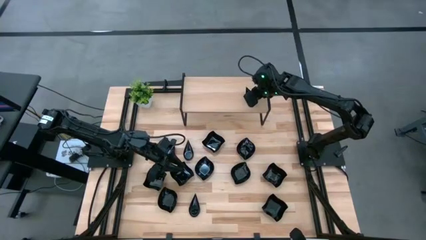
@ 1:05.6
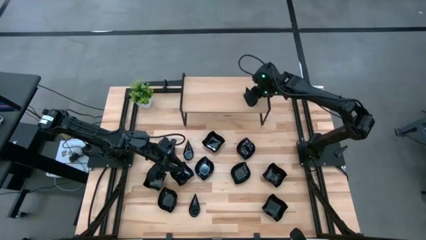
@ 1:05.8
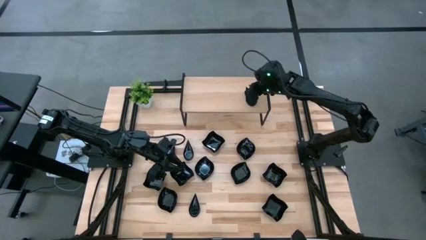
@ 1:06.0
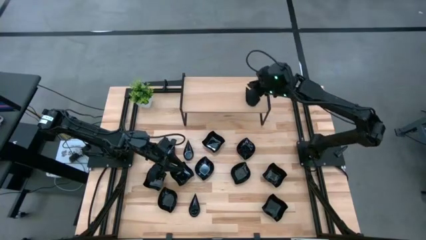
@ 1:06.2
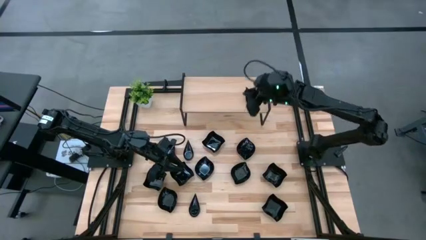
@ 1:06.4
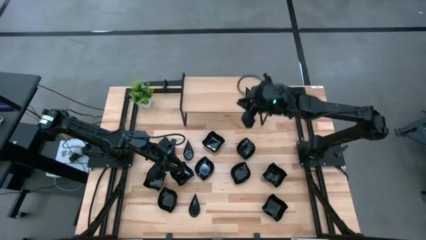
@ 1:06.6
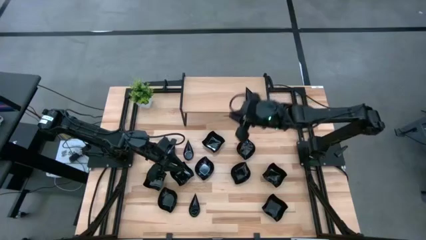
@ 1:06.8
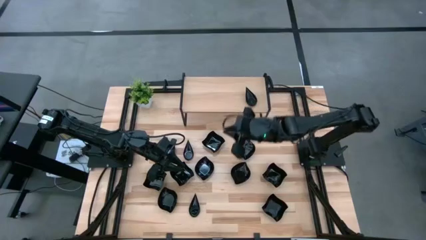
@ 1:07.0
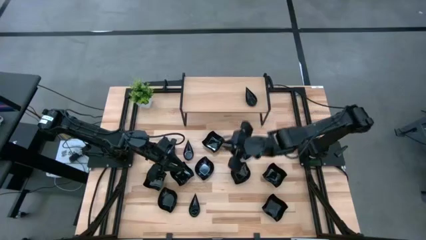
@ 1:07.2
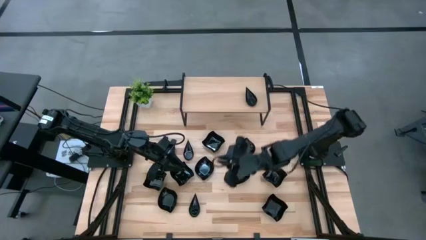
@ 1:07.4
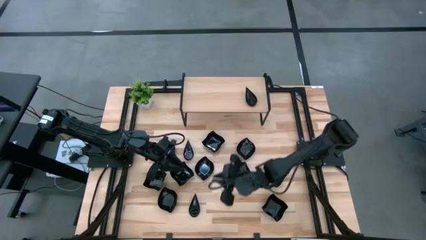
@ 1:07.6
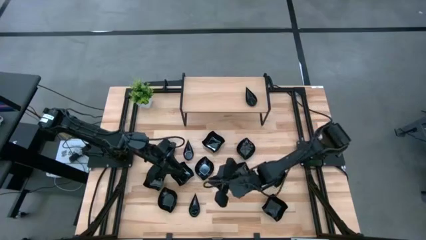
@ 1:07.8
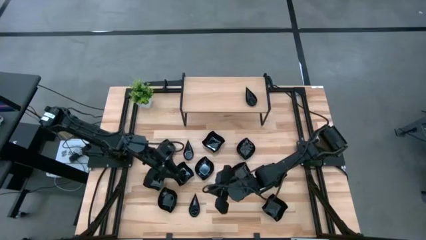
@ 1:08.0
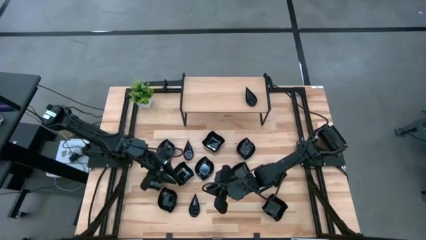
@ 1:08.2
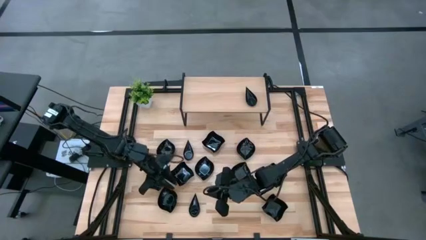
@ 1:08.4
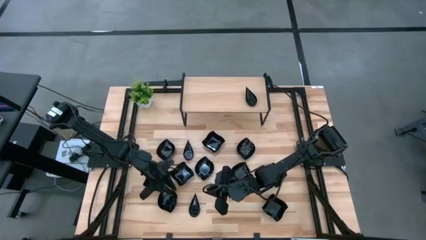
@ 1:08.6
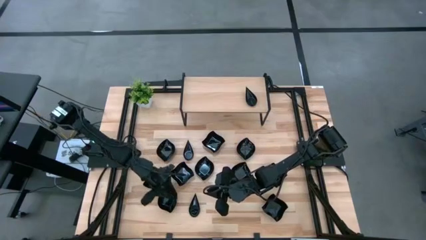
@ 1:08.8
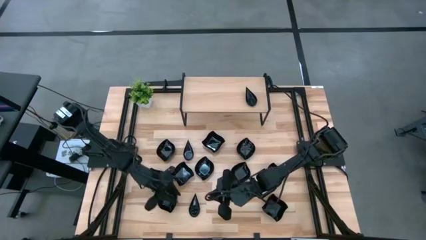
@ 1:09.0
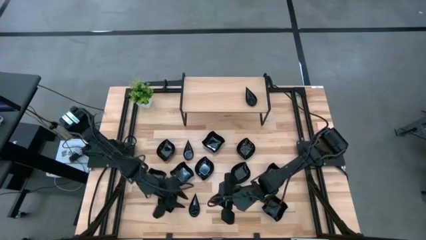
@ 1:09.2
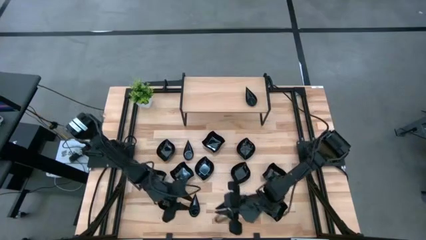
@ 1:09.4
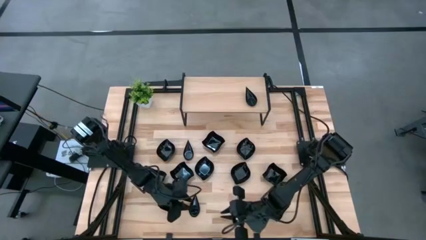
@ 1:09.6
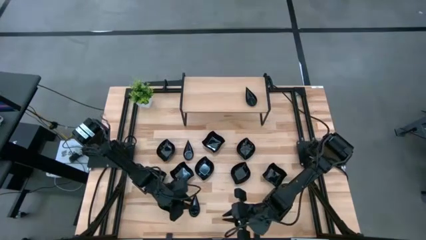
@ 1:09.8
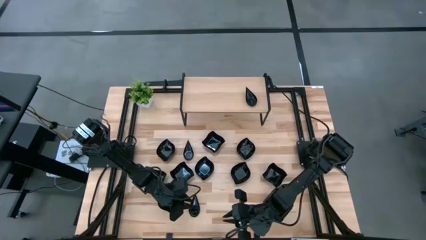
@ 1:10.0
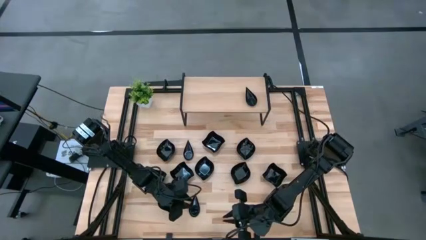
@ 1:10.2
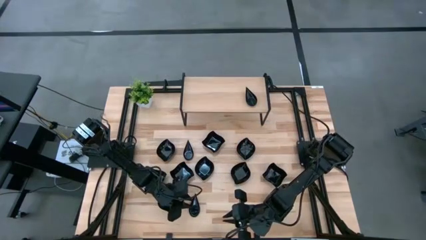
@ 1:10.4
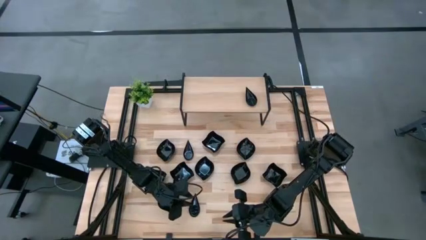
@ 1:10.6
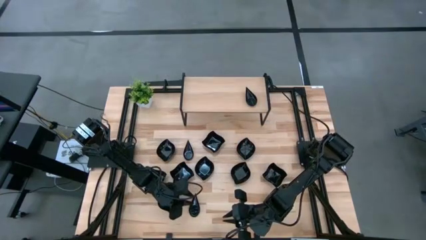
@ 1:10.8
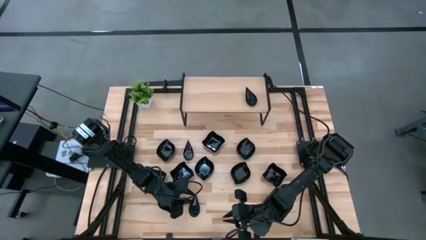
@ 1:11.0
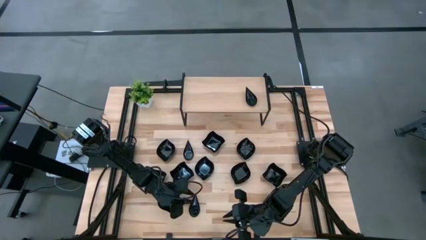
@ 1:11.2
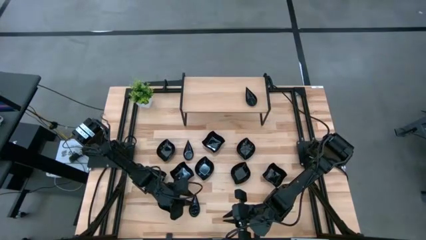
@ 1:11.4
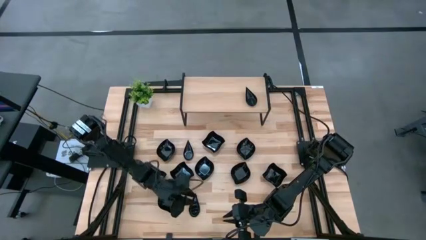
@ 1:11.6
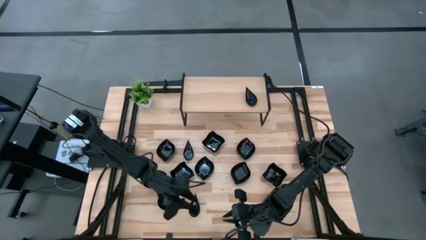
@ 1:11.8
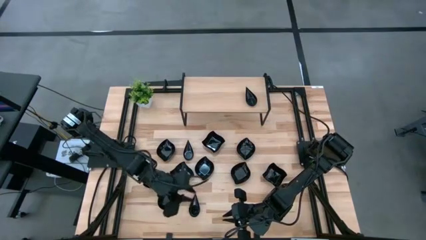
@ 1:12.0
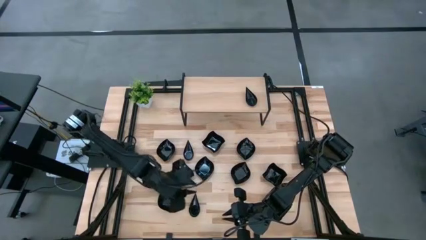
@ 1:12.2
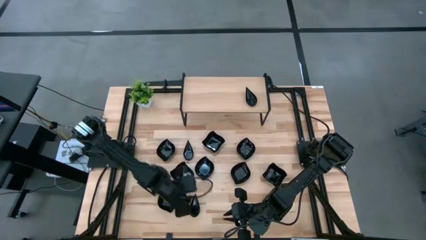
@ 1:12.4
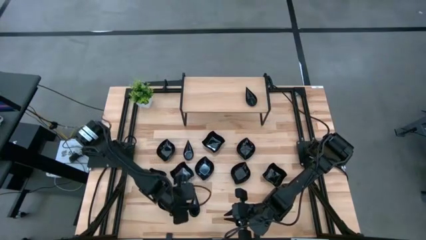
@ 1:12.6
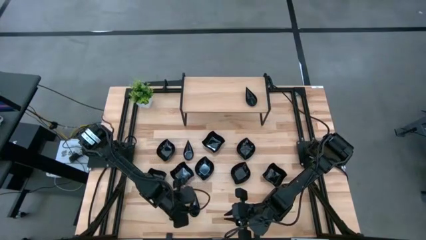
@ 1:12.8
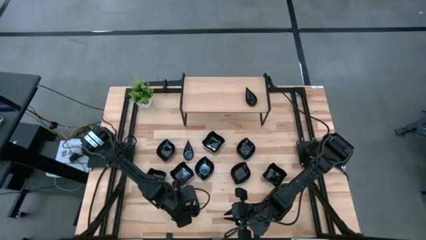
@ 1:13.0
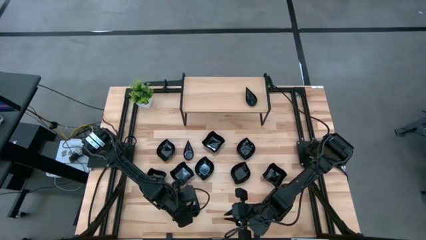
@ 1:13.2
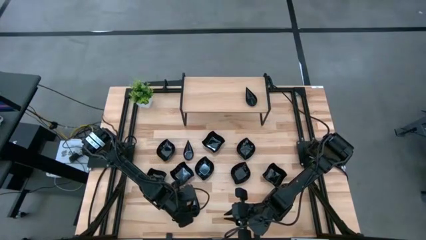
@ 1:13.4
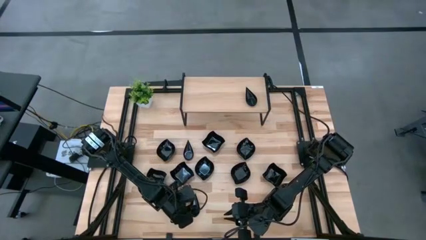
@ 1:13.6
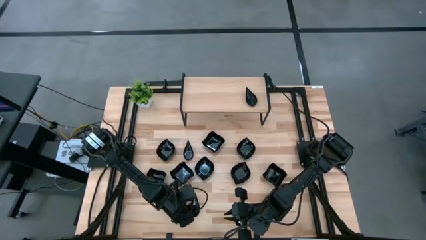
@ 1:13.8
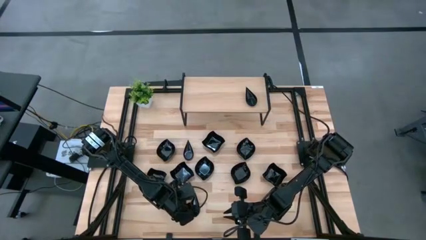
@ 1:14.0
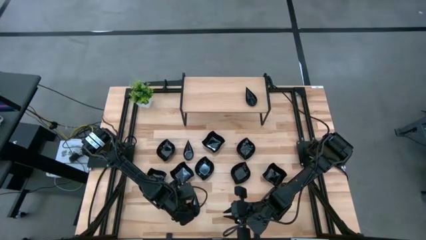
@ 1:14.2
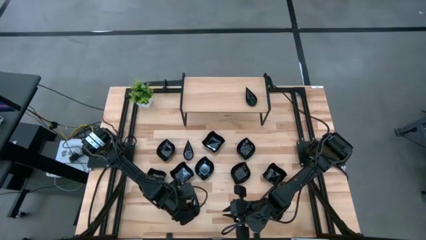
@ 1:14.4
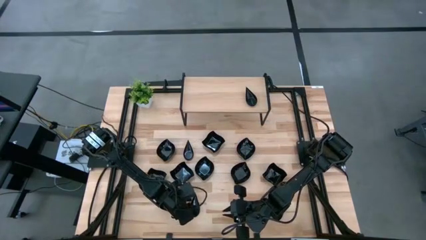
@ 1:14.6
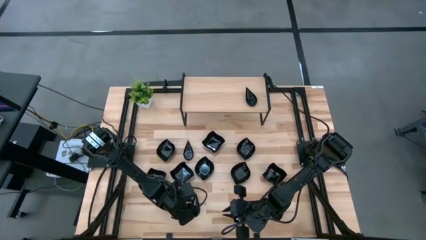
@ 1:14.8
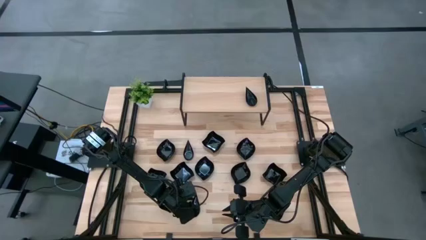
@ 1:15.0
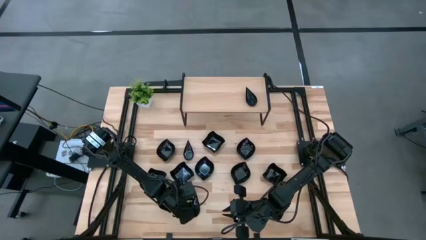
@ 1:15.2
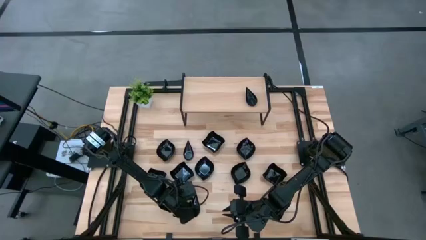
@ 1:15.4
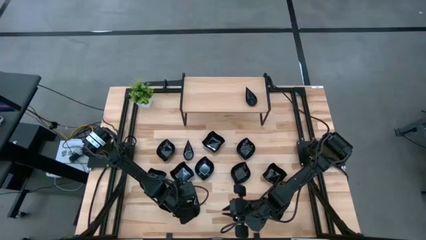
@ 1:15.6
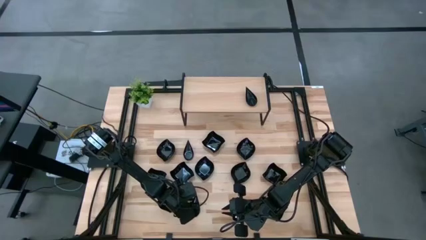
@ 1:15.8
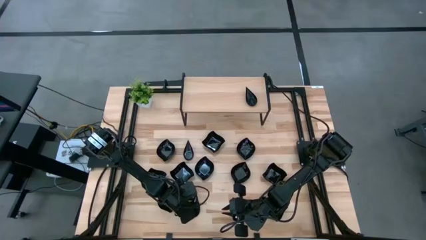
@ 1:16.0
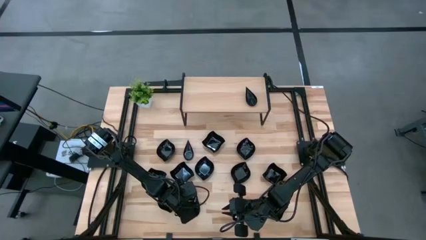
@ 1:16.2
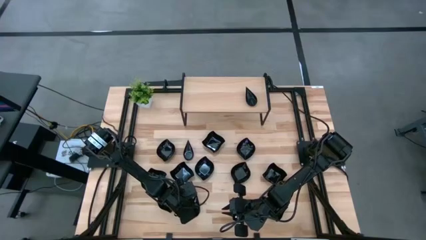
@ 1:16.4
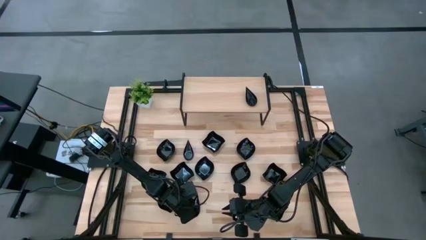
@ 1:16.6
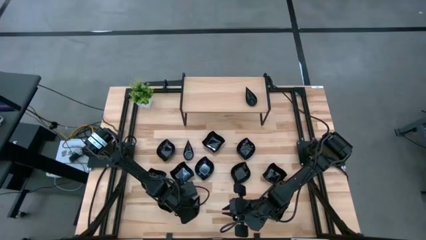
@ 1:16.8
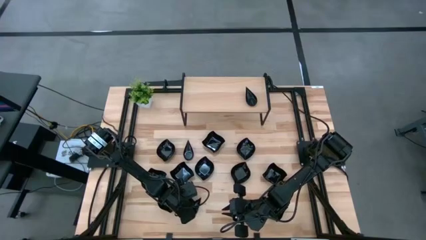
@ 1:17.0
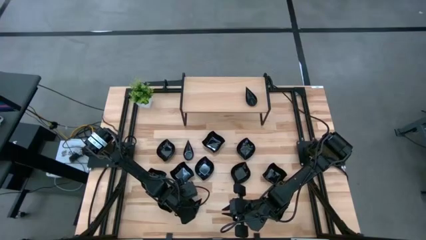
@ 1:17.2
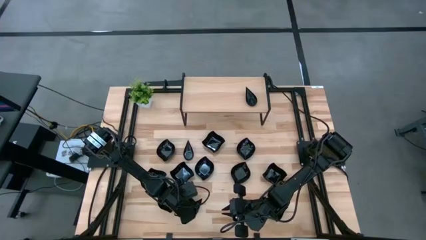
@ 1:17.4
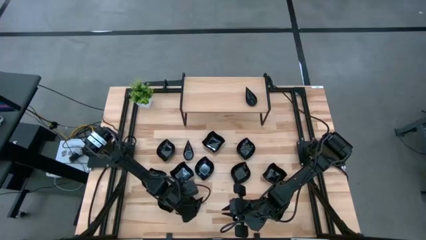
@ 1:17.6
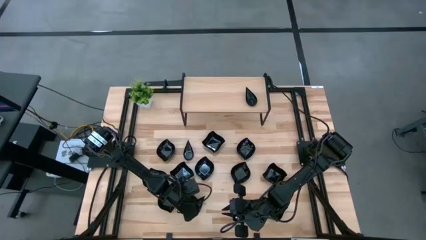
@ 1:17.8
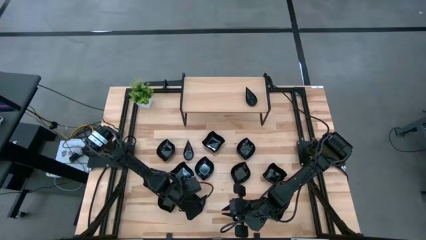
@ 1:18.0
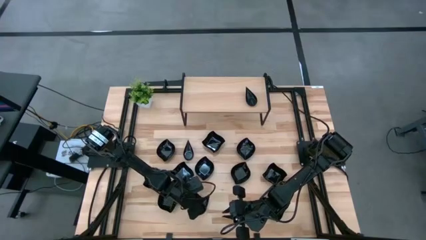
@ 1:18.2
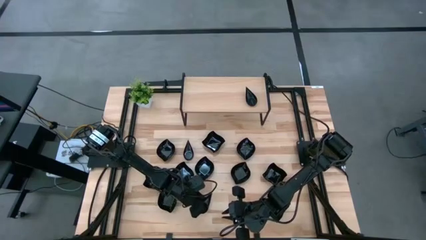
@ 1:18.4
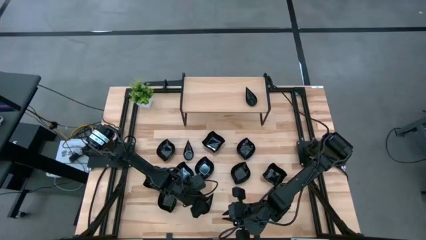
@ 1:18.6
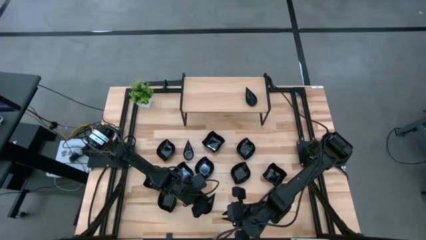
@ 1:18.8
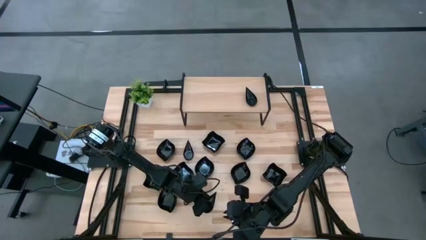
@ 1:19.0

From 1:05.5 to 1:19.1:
Task: Pick & Place Mini shaped plates
Stack the black drop shaped plate on top of the black drop shaped plate on the shelf
